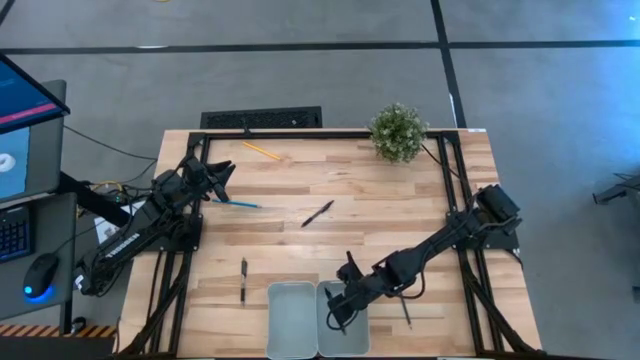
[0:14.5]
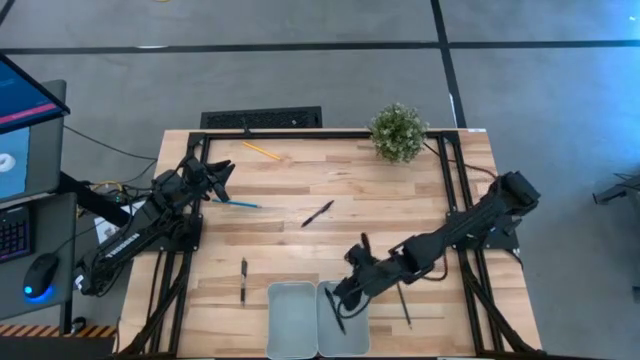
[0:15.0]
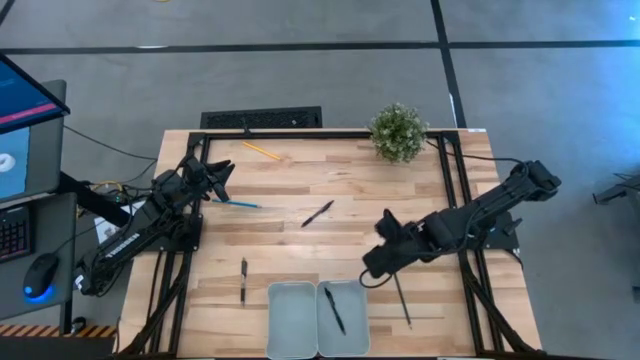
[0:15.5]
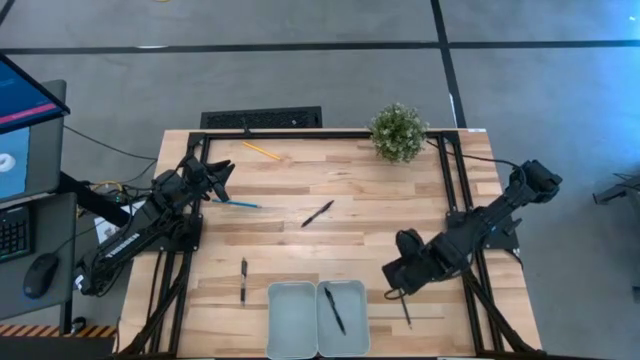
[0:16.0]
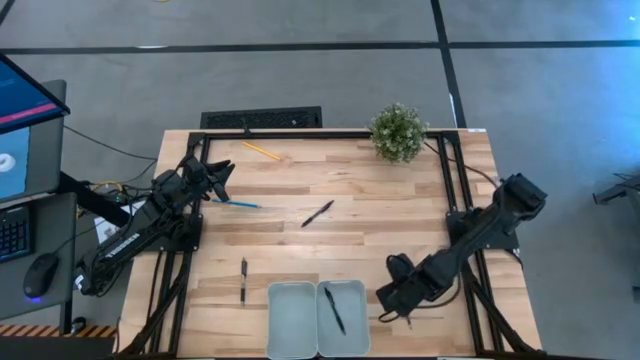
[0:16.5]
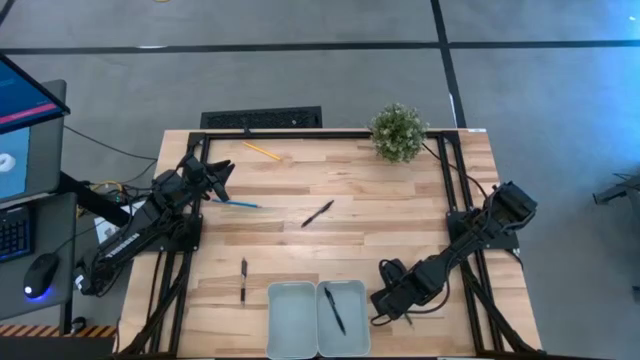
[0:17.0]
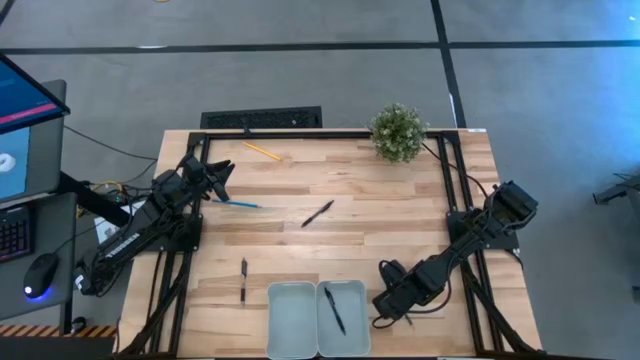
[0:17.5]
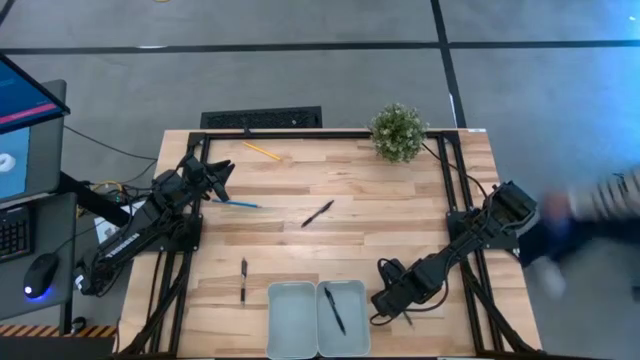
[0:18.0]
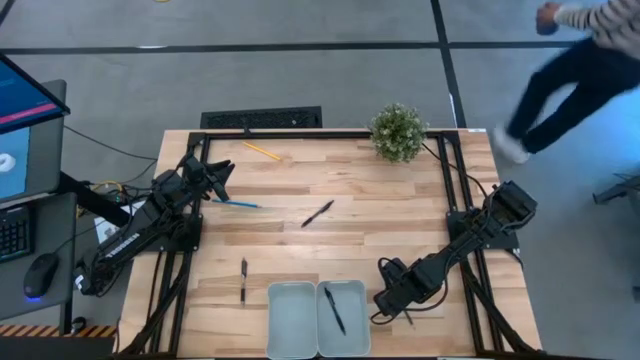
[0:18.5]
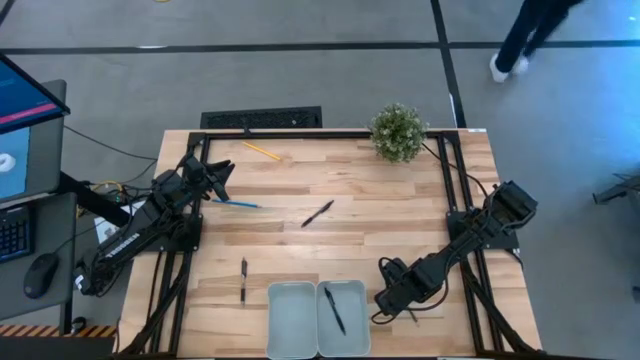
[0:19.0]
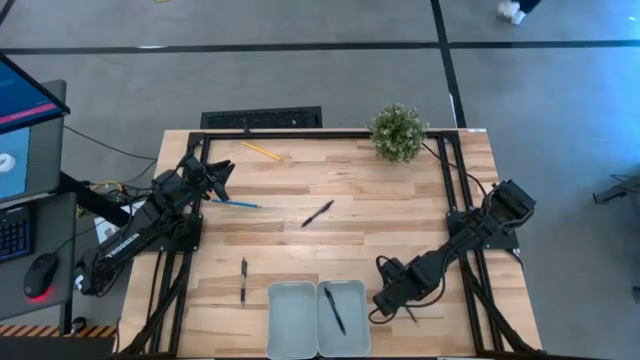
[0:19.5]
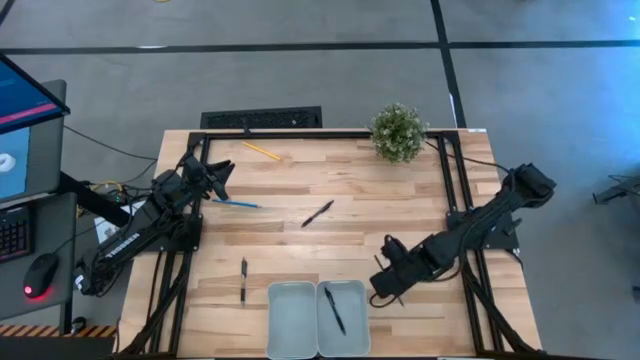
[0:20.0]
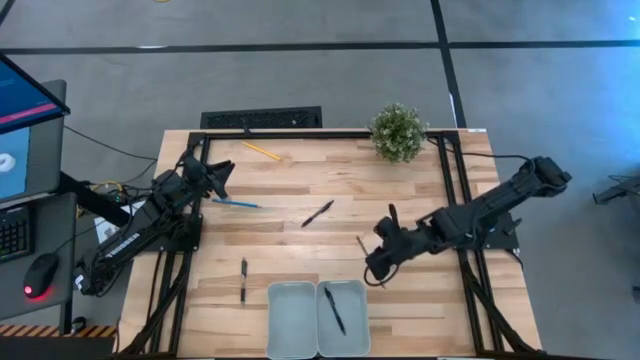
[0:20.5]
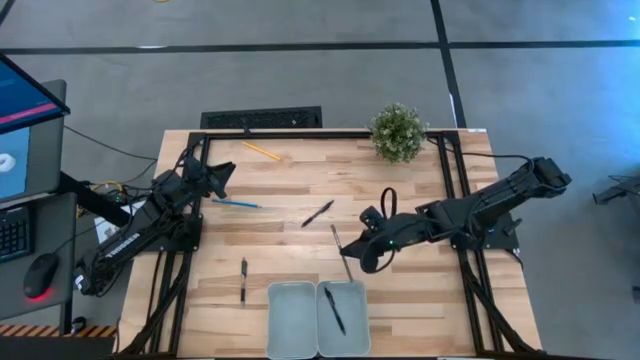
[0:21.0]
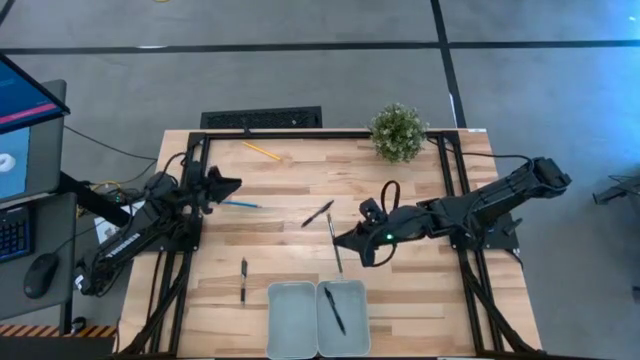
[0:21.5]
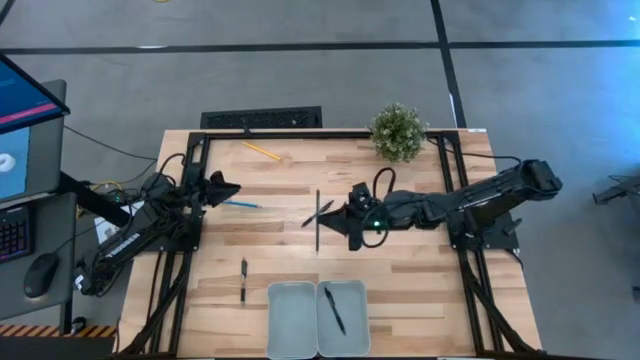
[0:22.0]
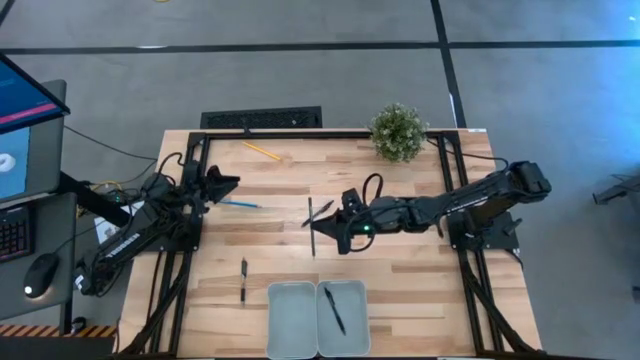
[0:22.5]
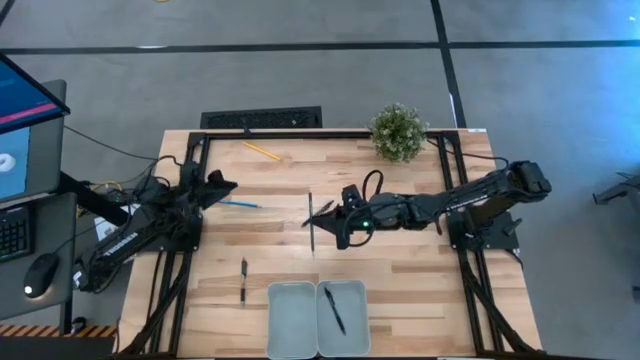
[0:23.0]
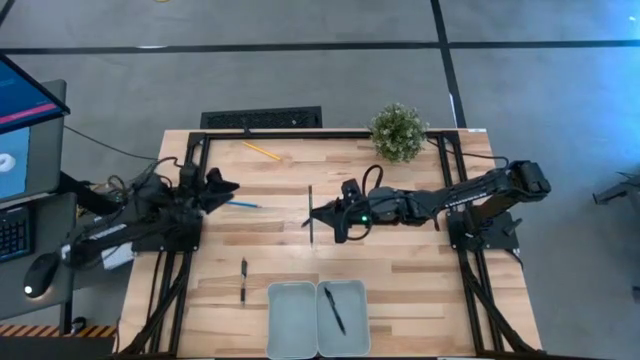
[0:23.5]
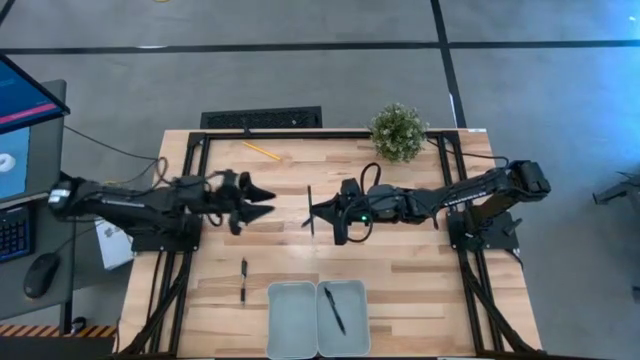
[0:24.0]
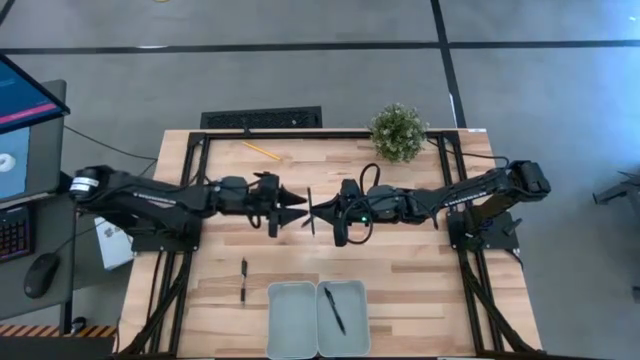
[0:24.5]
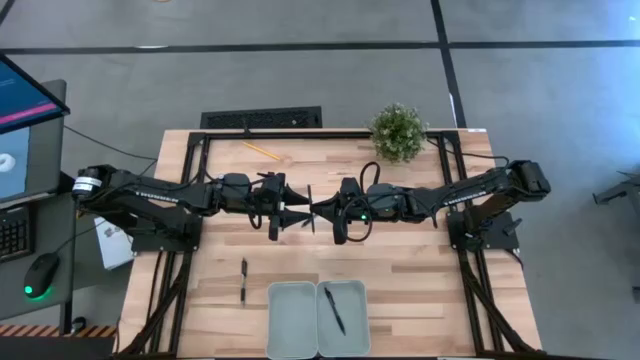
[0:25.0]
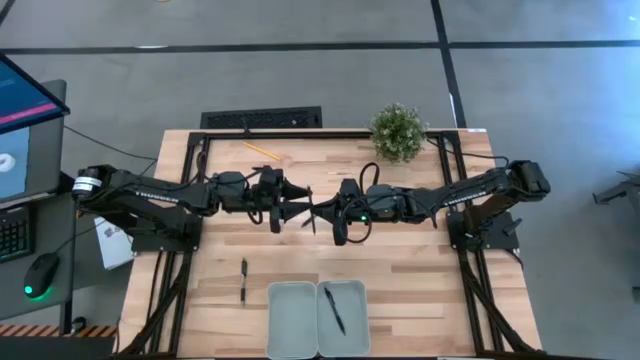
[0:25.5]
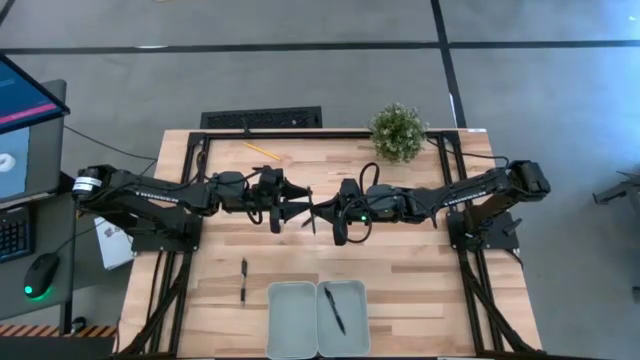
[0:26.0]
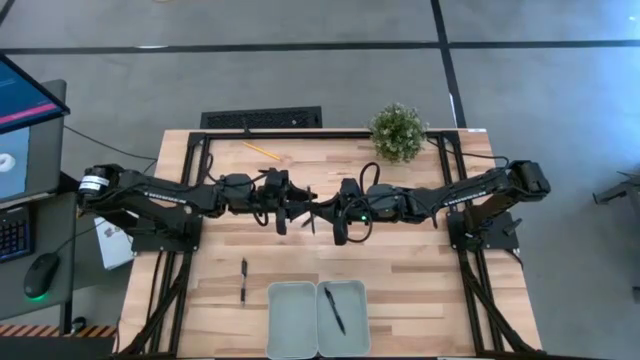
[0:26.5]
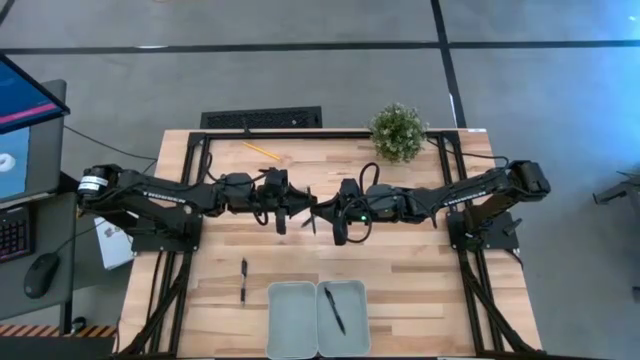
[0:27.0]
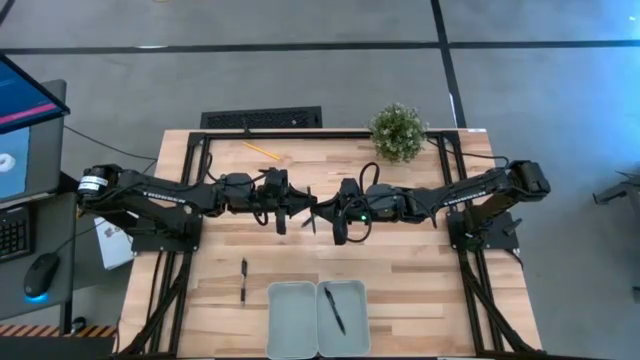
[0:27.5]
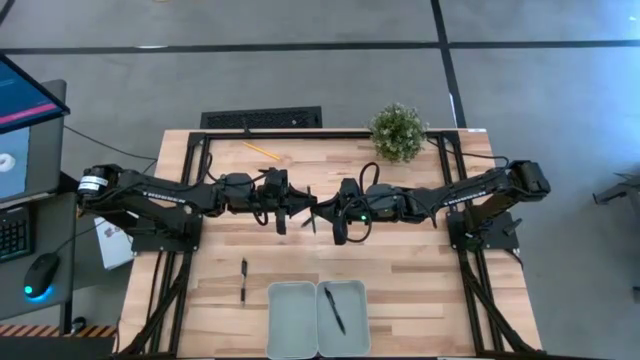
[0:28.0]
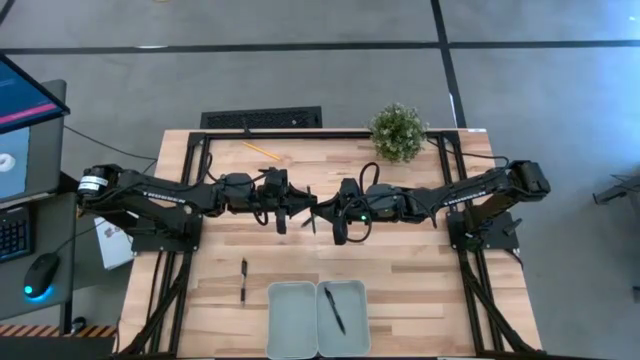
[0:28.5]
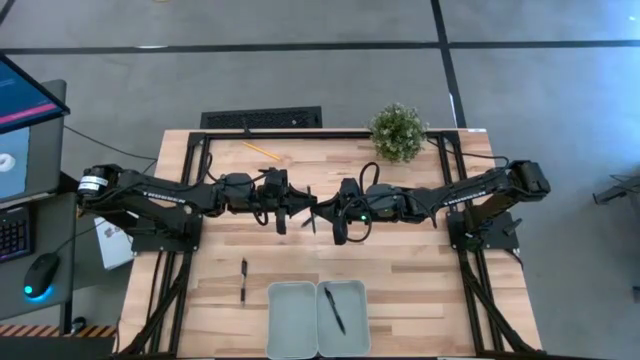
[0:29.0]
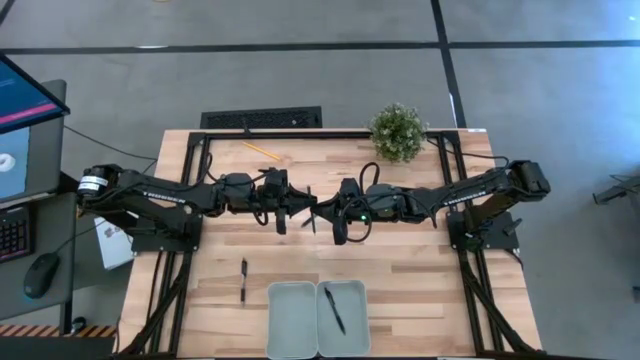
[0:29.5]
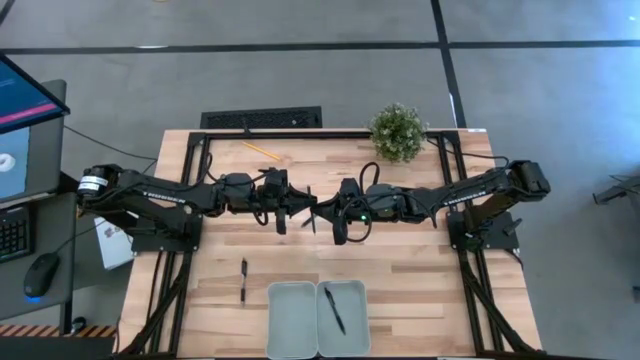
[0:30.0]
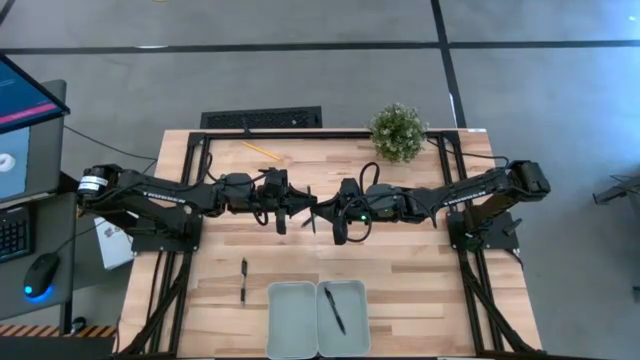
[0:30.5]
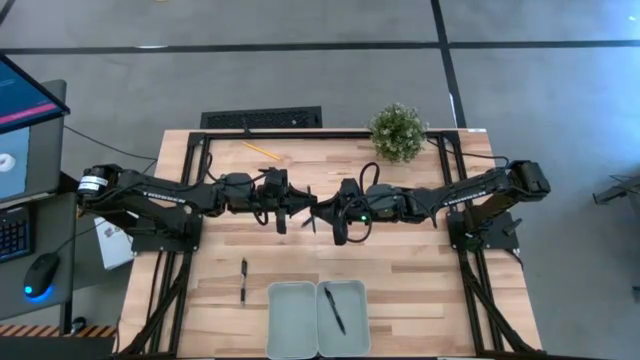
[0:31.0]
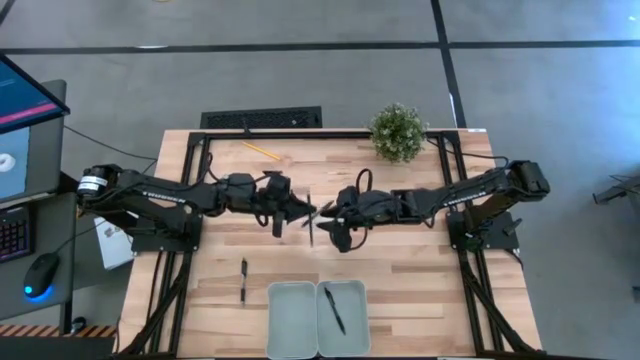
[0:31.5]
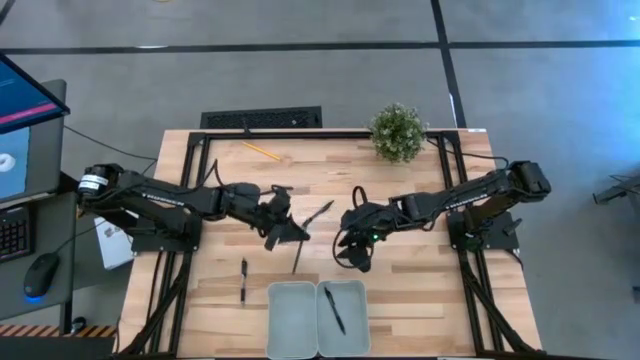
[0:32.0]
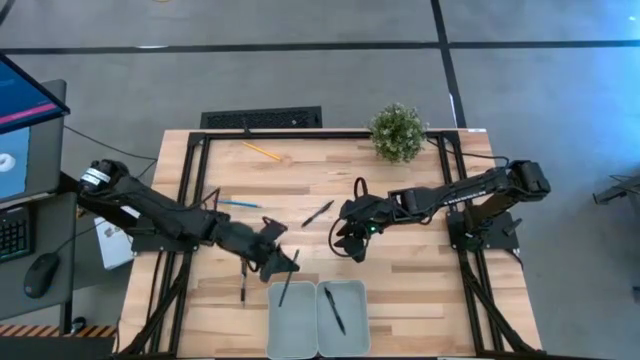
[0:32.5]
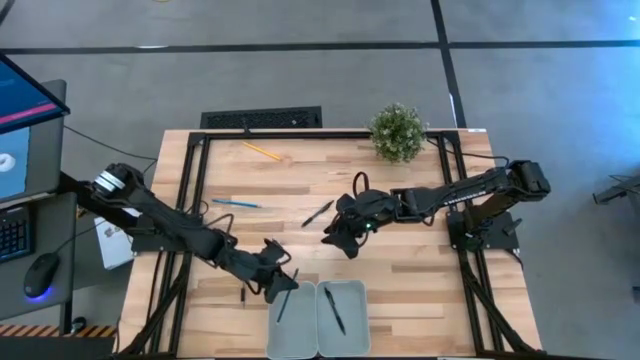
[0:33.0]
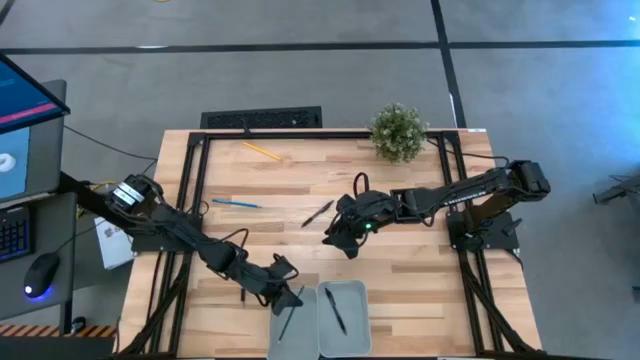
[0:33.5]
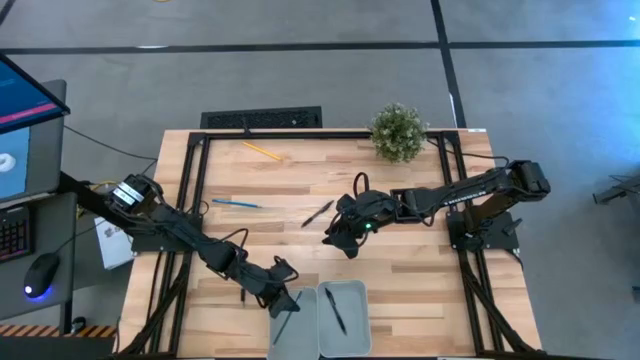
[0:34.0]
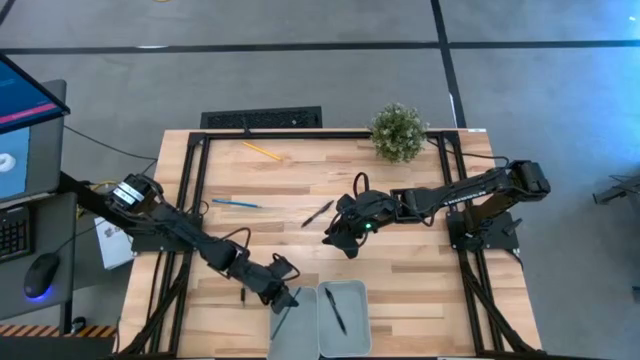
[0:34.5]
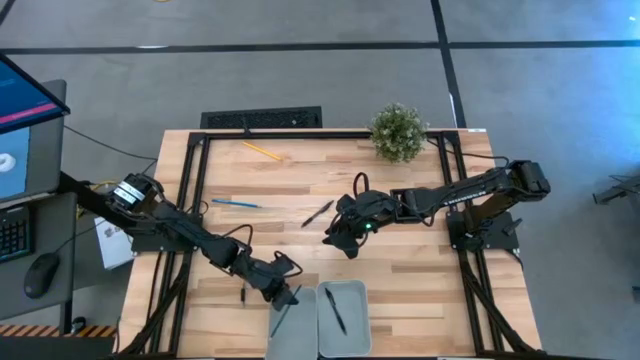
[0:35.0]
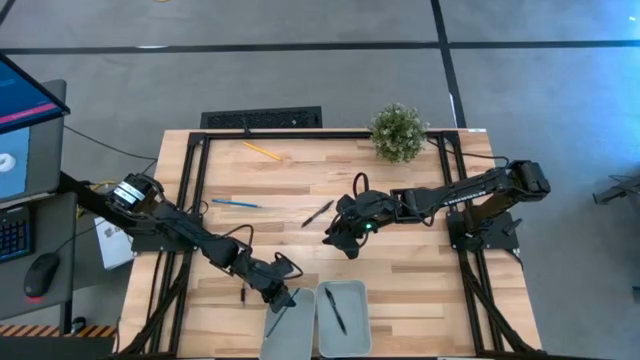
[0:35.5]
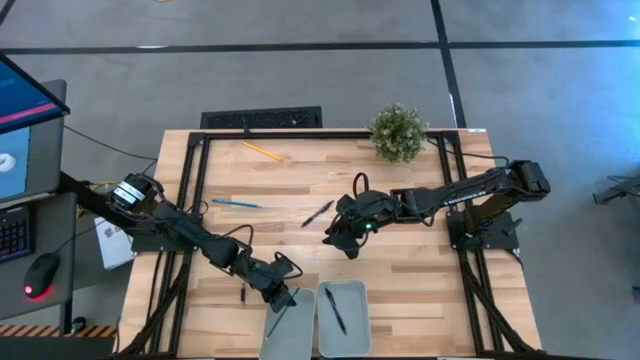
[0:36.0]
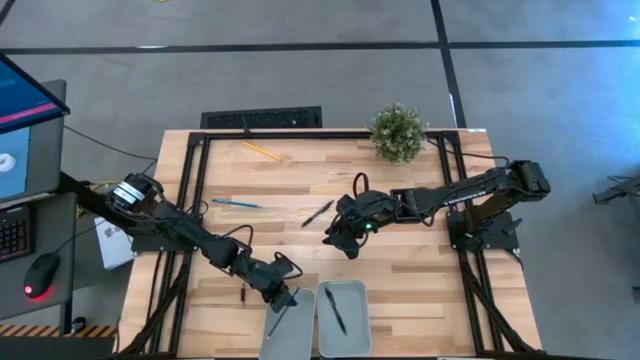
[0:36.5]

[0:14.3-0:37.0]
Task: Sort pens & pencils
Put the green pencil into the left gray bin
